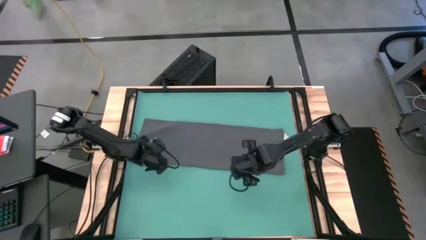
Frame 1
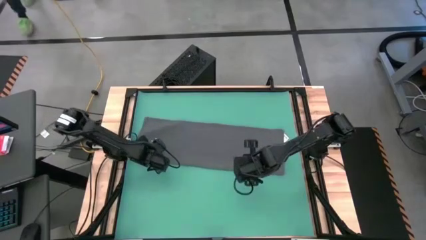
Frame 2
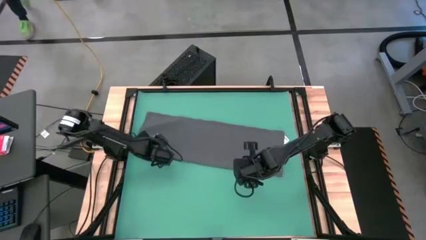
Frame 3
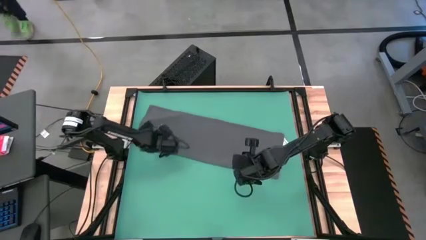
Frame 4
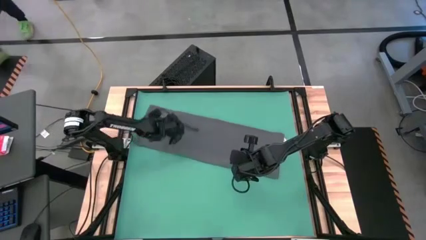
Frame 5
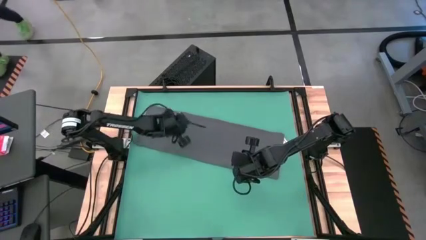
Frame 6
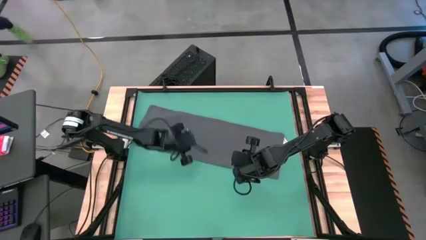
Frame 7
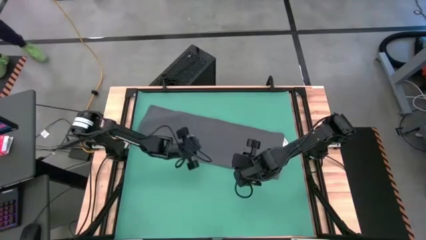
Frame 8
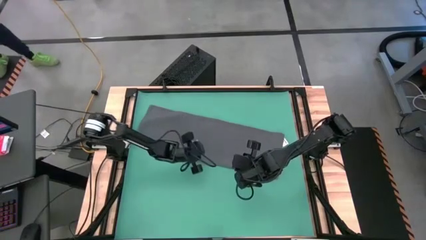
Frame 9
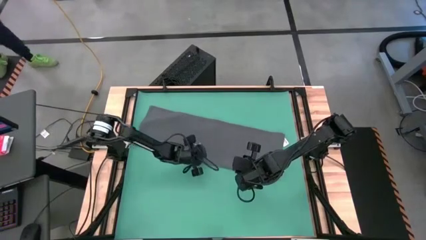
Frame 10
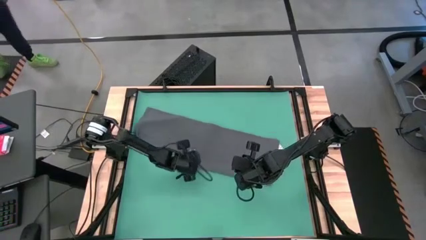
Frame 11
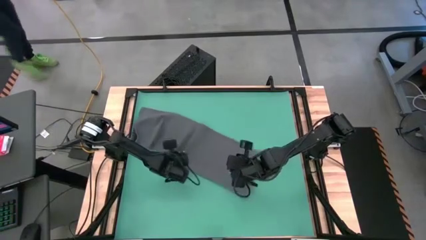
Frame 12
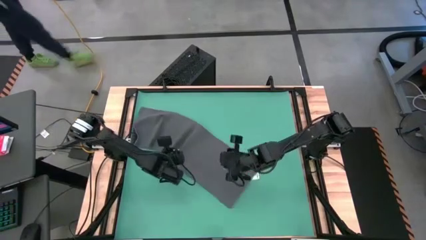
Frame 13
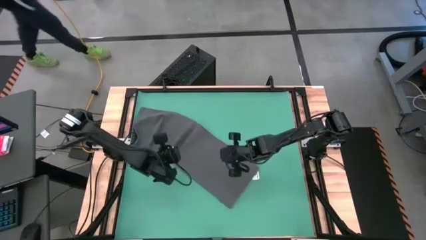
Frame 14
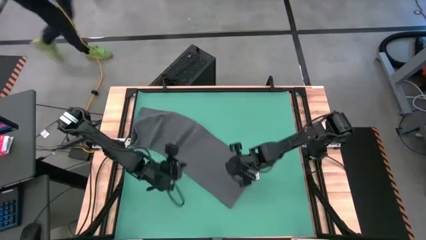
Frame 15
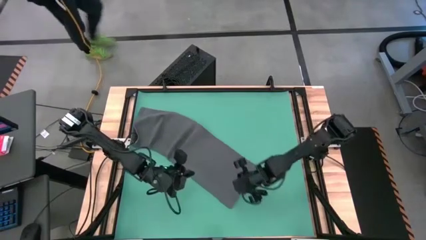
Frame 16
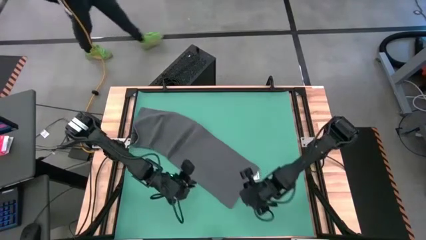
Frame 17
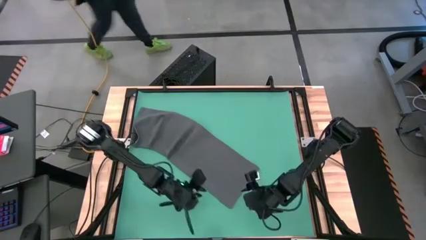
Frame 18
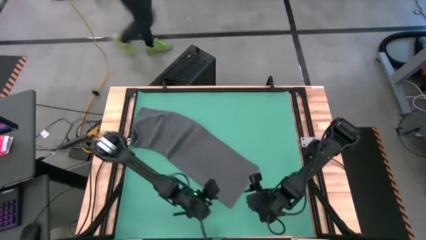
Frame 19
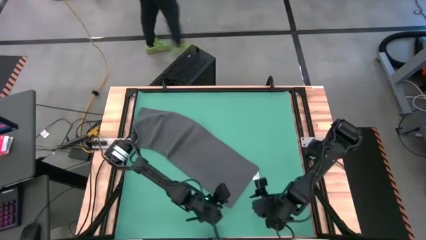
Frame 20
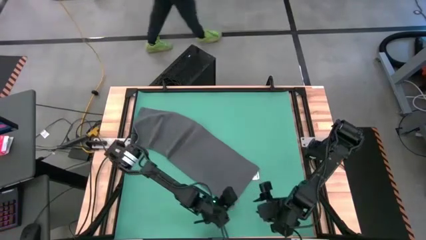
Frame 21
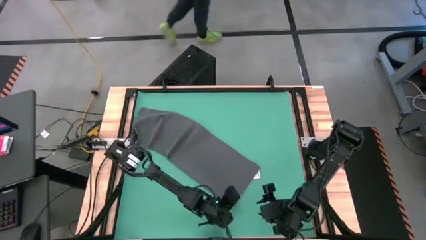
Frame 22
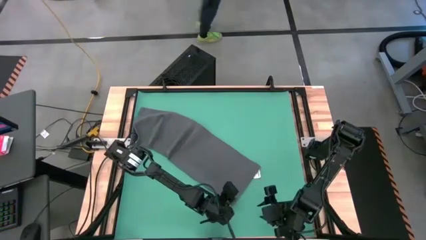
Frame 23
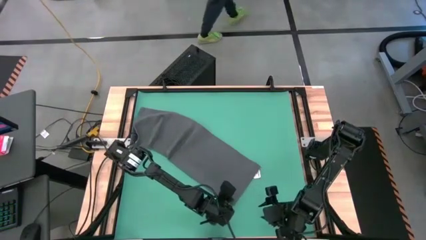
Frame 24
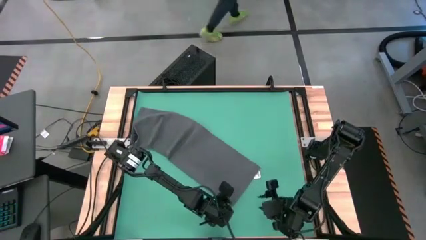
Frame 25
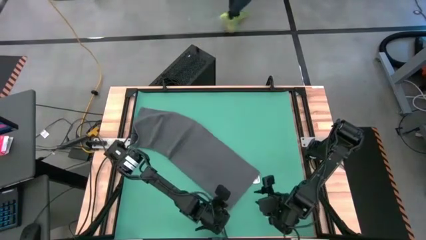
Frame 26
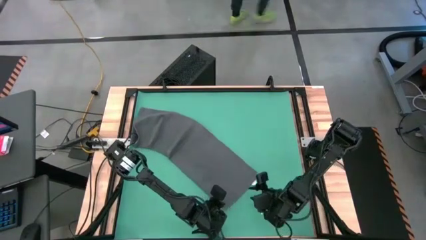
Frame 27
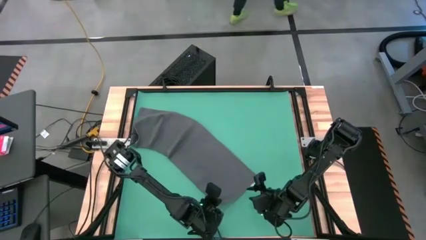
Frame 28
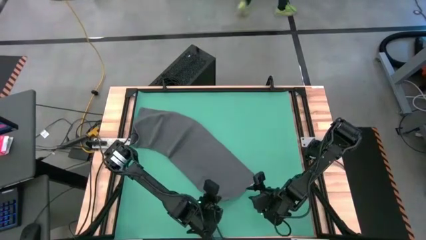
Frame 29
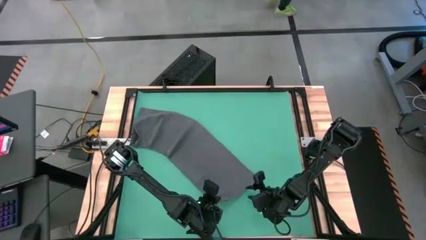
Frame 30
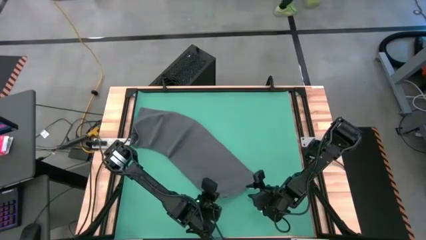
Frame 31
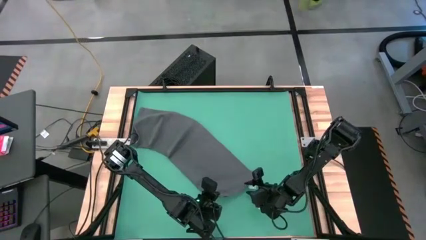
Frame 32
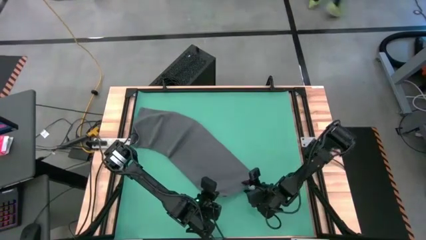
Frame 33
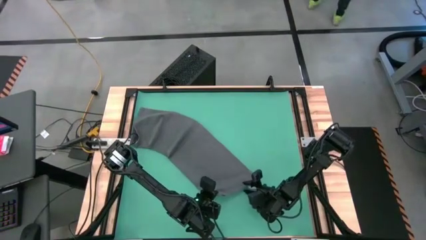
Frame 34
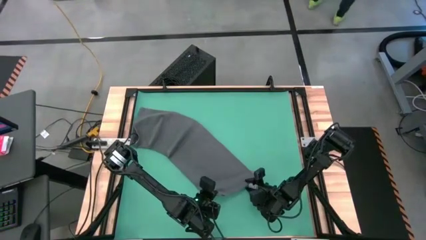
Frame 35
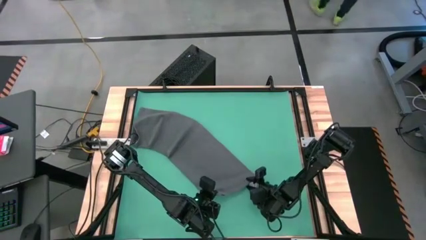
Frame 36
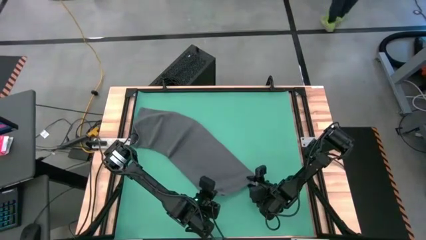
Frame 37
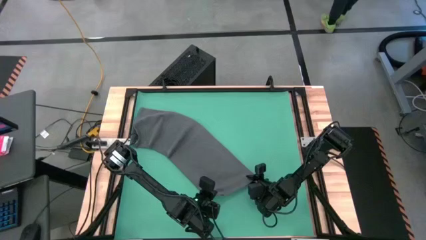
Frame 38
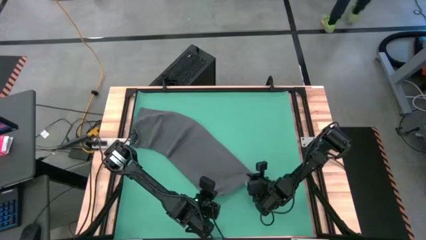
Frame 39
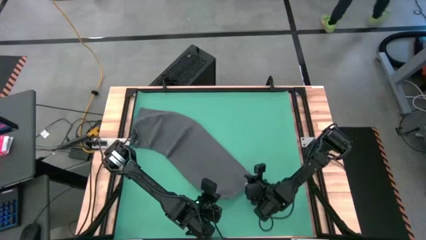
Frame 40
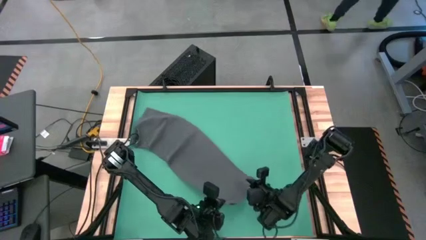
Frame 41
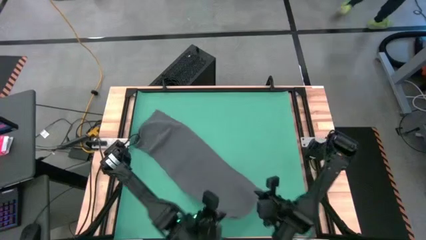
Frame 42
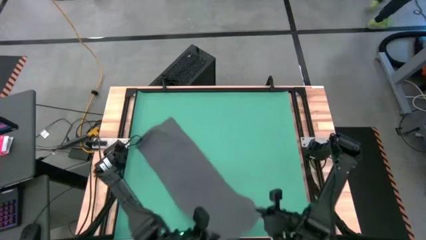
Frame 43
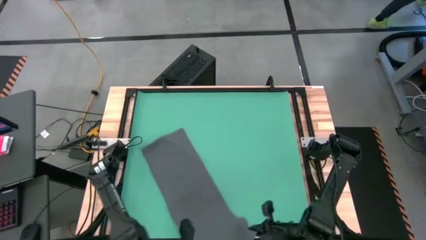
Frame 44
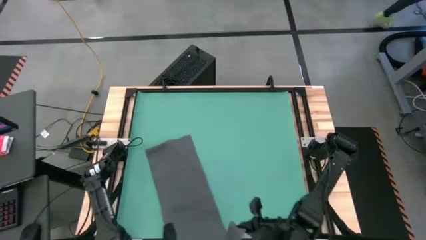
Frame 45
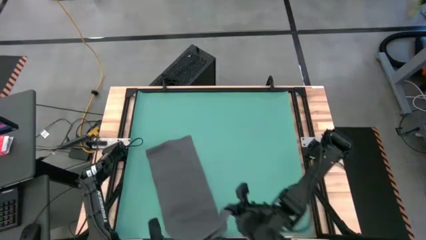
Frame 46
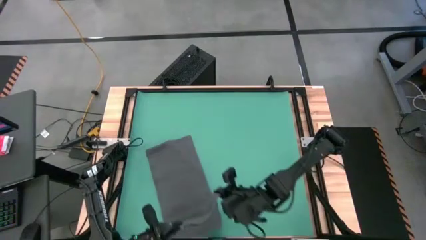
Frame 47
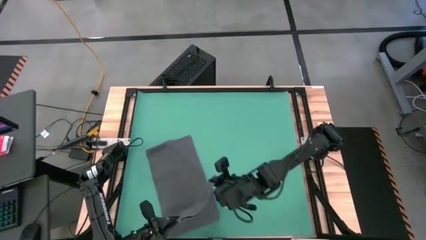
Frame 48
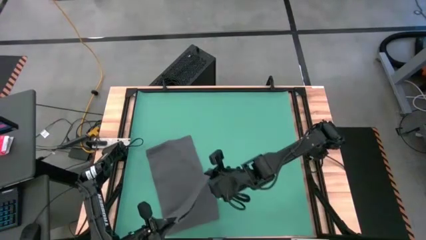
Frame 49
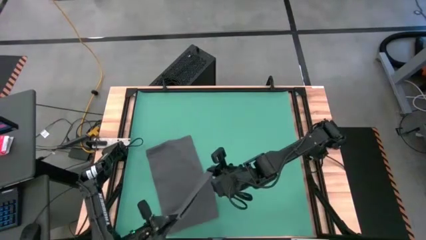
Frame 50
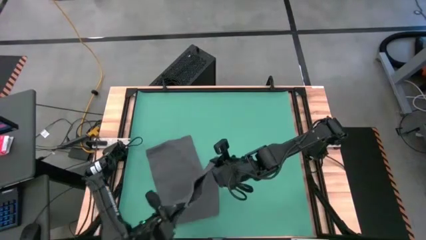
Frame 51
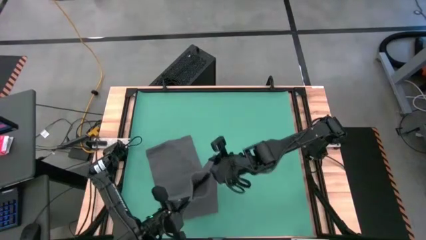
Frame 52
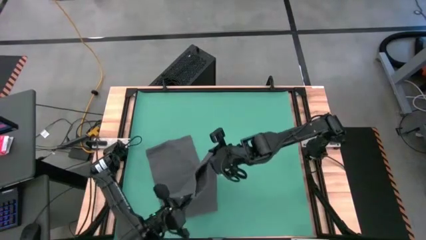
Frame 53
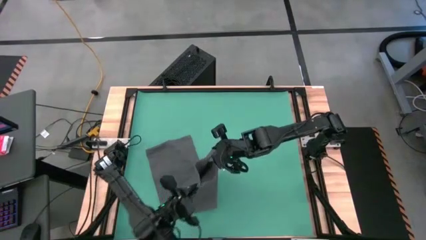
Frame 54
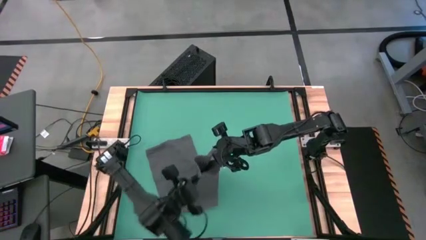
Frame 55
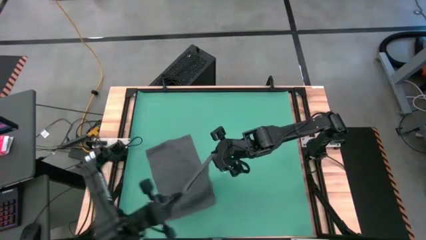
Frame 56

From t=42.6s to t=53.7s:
Task: Roll towel
Roll the gray towel

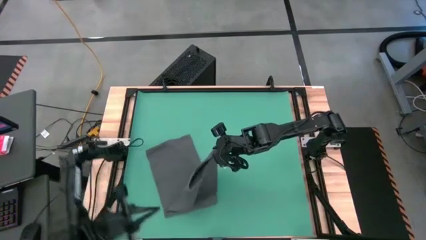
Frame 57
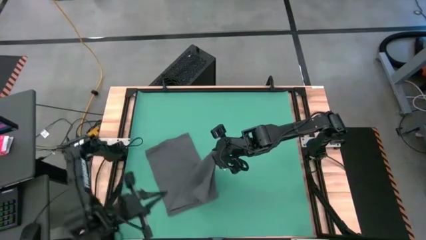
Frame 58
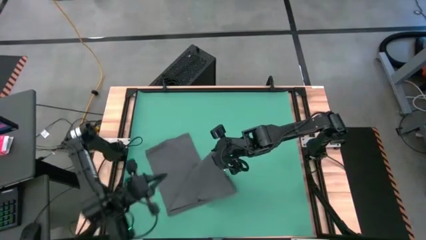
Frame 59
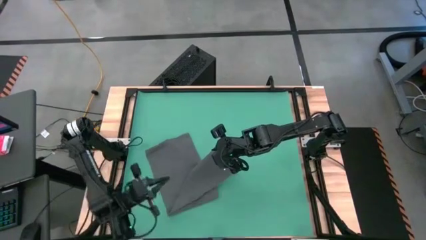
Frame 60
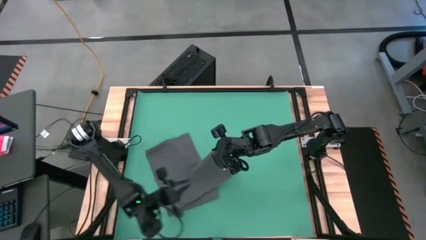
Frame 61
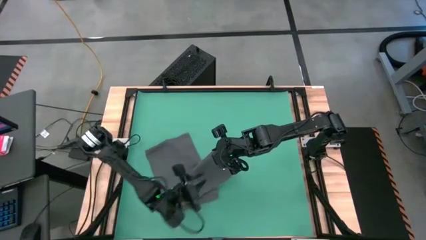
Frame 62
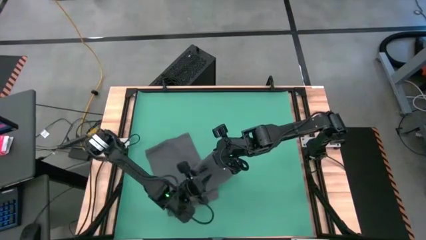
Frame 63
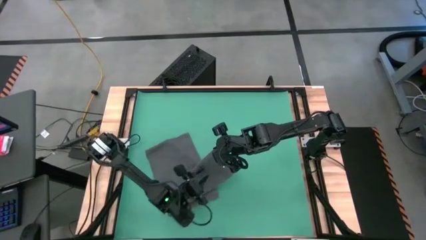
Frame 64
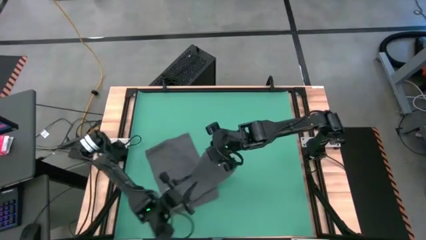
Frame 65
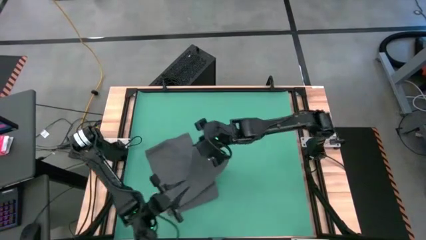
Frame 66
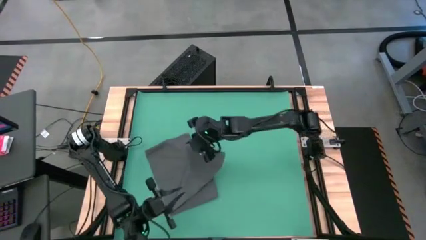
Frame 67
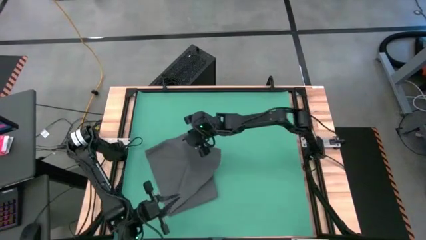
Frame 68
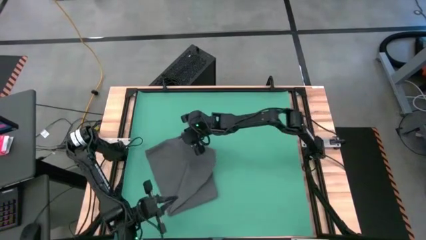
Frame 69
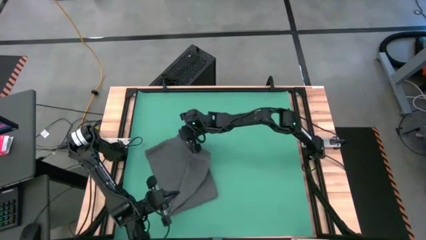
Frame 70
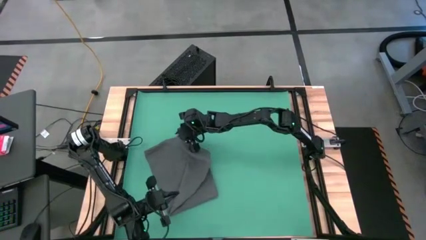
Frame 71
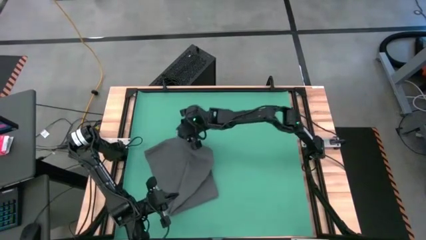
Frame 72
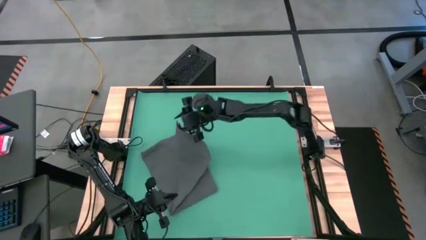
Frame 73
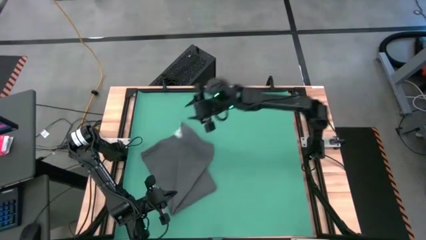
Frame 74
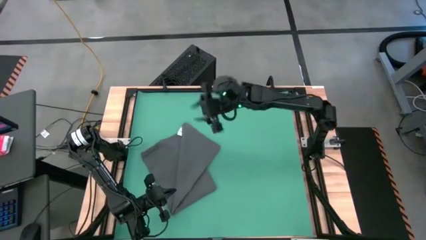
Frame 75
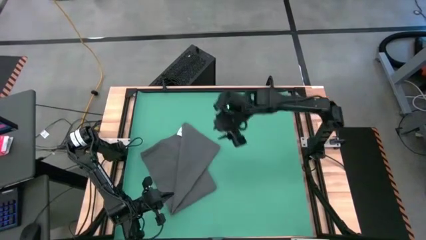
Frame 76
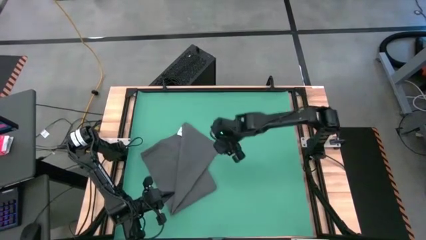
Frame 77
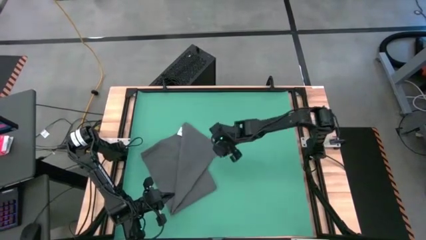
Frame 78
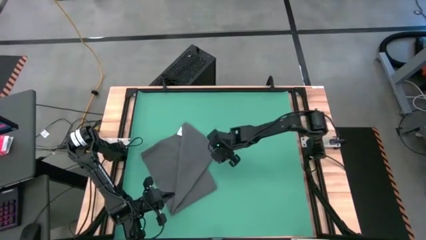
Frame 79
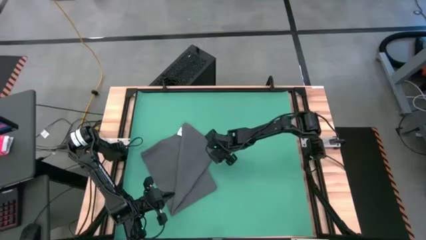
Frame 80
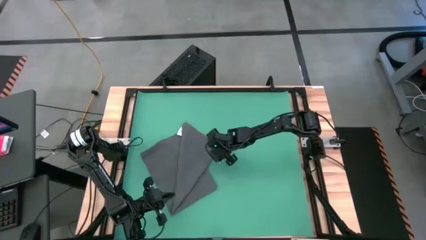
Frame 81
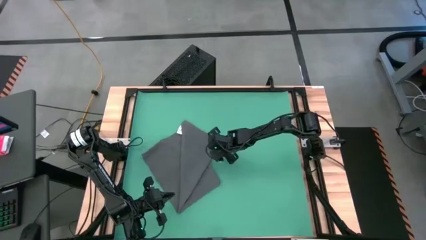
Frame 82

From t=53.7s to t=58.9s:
Roll the gray towel
